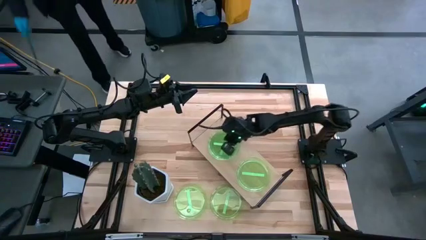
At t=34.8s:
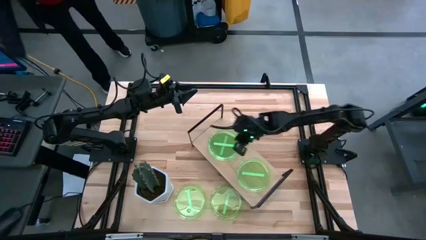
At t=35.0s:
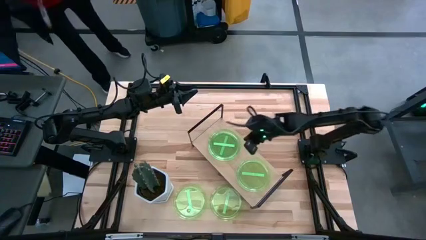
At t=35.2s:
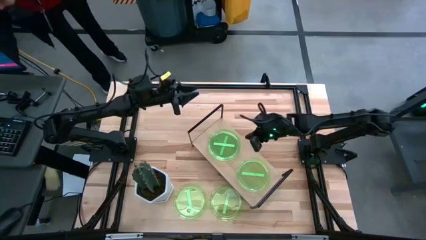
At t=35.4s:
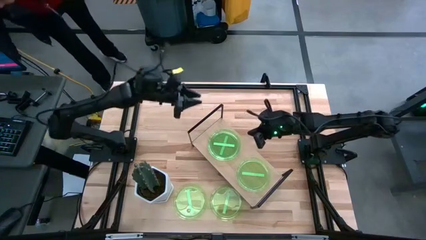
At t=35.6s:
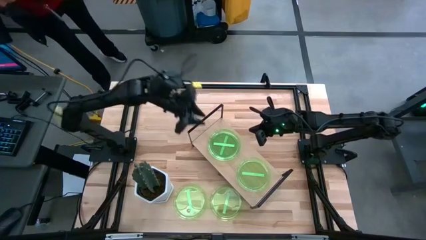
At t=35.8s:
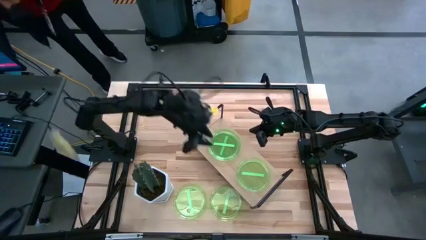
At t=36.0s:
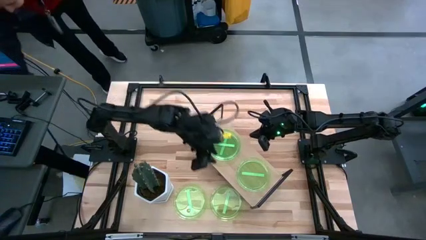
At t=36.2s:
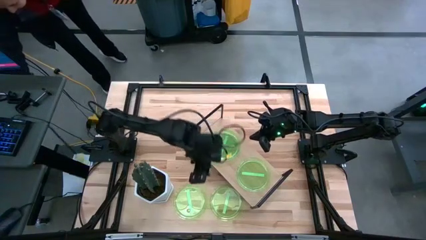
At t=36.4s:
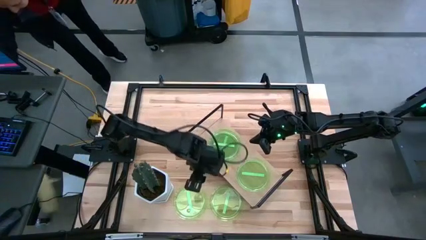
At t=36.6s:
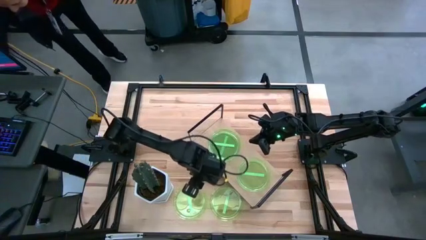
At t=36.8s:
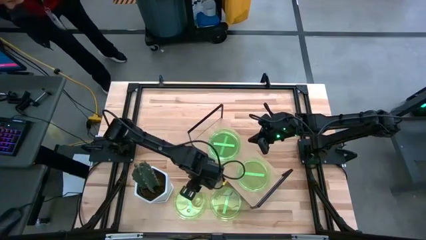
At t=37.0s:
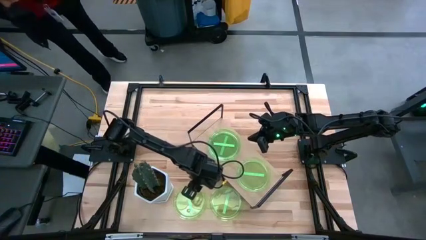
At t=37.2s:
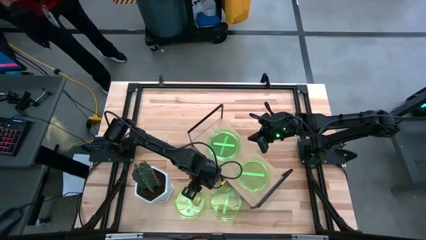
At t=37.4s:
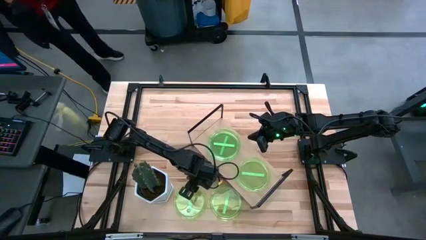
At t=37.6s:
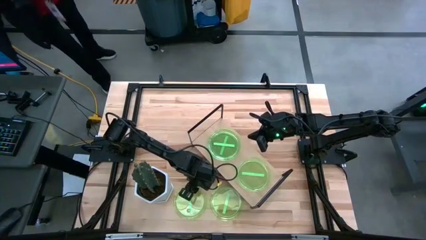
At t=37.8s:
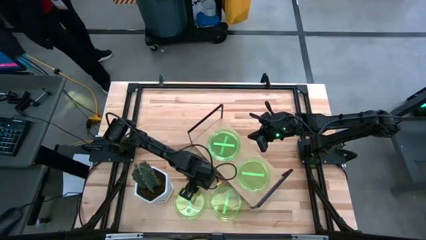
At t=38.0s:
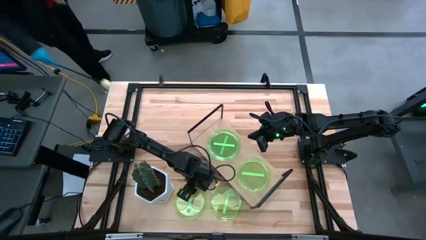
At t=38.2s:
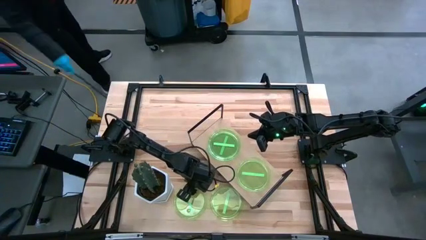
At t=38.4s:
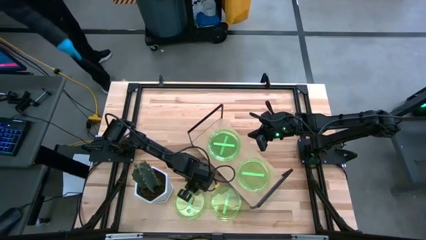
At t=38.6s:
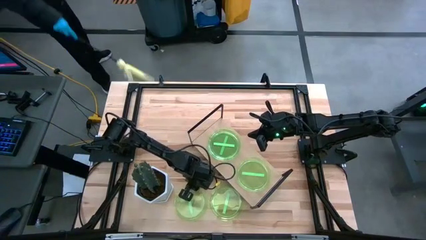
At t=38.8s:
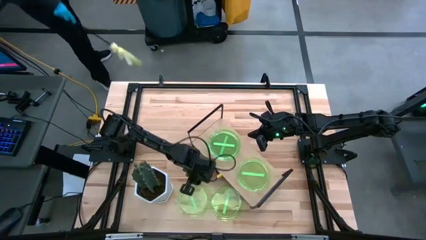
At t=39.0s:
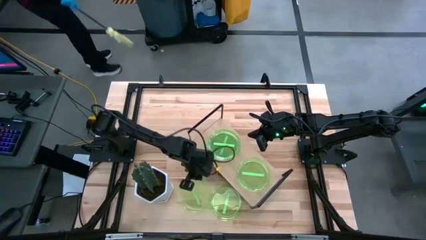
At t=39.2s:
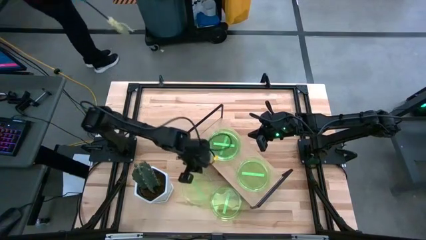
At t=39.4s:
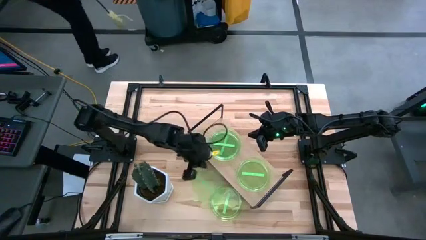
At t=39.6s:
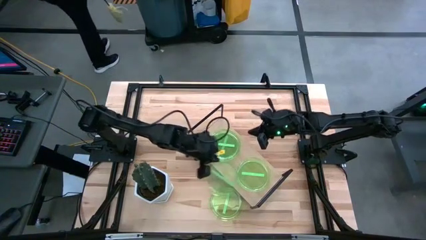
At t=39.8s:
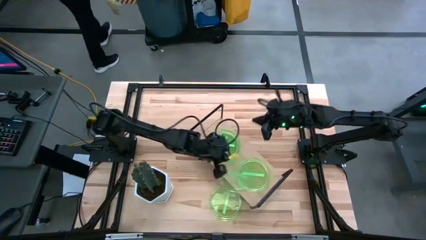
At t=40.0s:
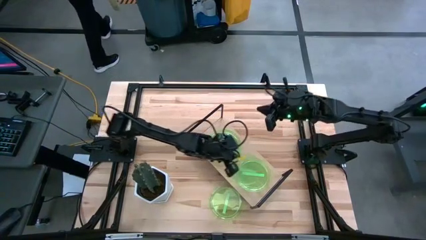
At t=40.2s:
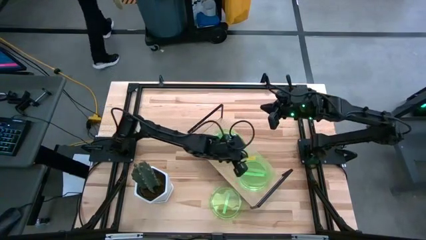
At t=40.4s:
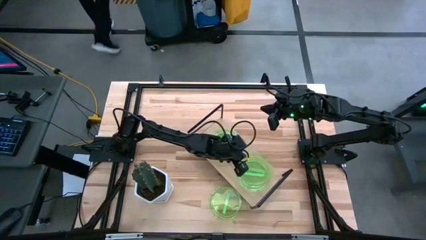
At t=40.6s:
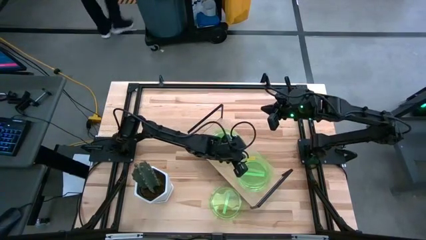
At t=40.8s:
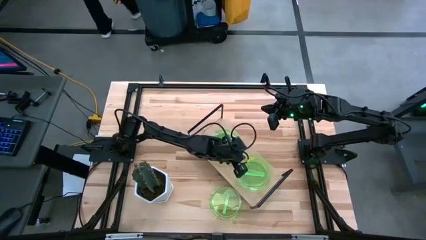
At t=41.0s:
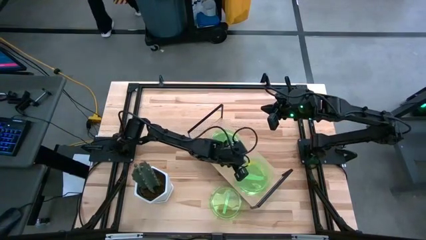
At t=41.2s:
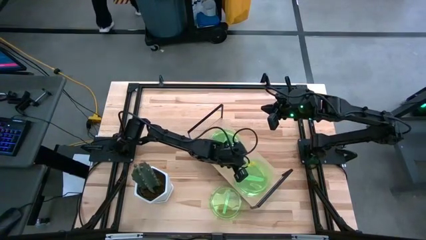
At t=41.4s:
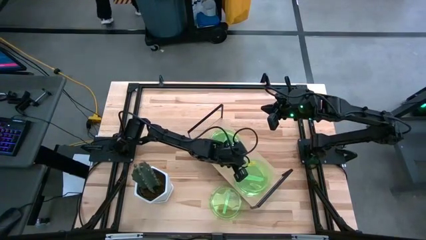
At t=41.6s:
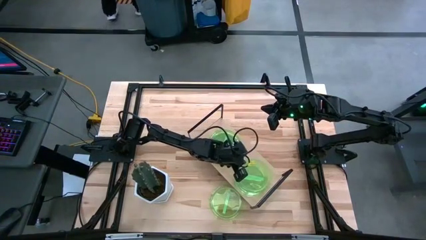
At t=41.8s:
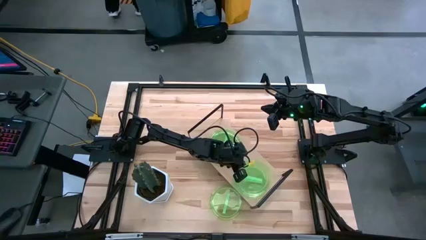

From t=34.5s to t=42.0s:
Task: Place and stack plates onto a shelf
Stack the left transparent green plate on top of the right transparent green plate on the shelf

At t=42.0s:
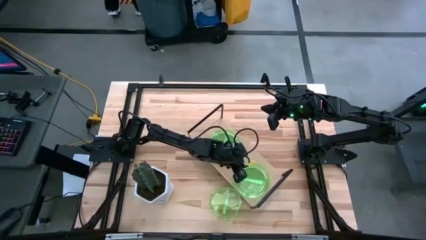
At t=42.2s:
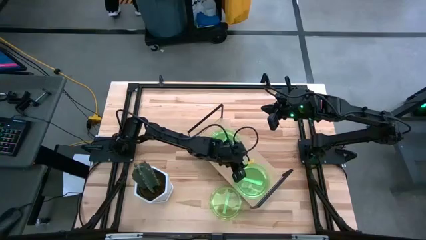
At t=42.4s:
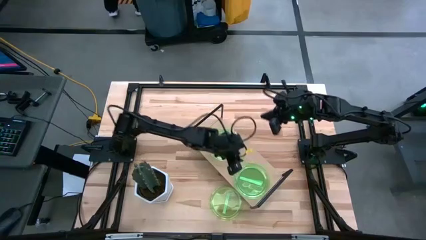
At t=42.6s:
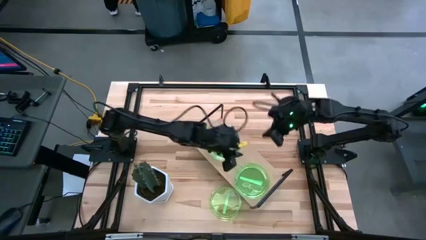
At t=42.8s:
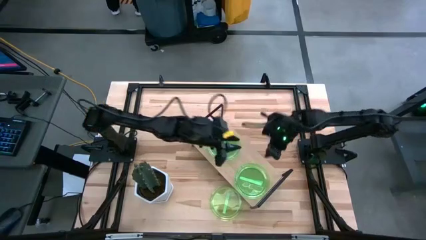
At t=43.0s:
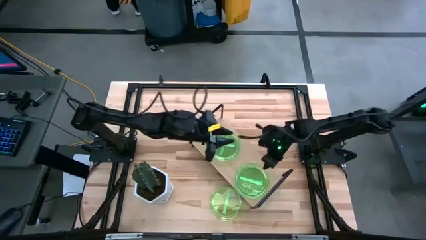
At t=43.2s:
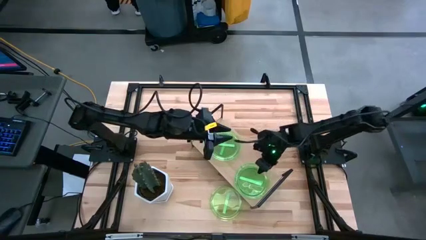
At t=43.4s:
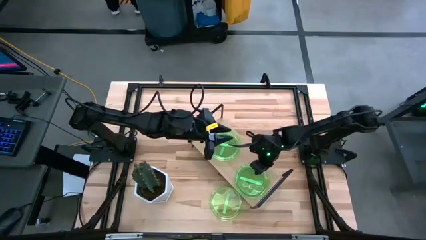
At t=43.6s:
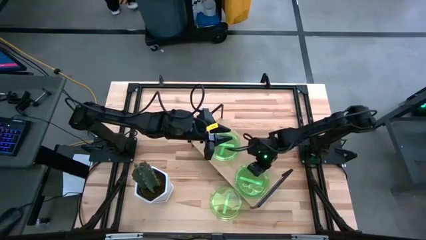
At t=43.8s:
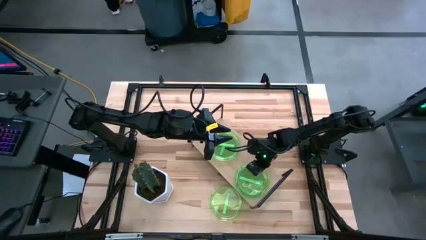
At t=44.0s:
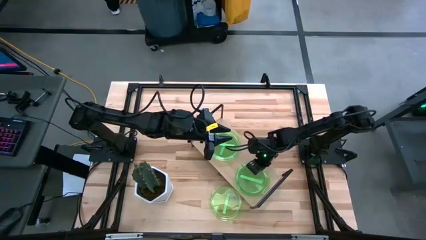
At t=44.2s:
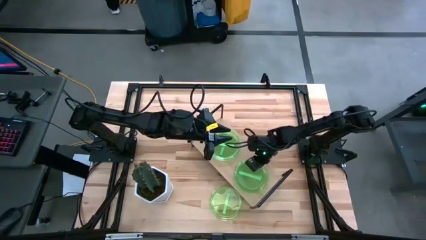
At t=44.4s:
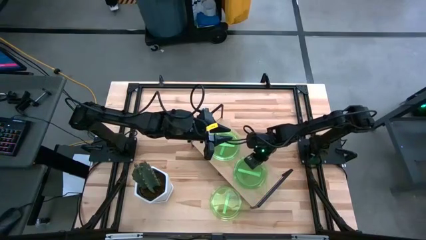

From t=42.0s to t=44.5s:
Adjust the right transparent green plate on the shelf

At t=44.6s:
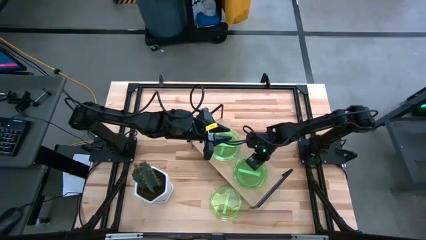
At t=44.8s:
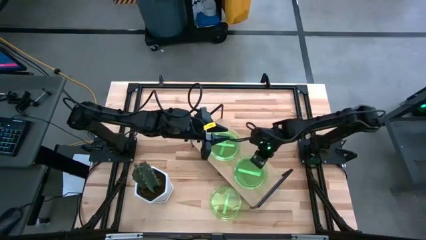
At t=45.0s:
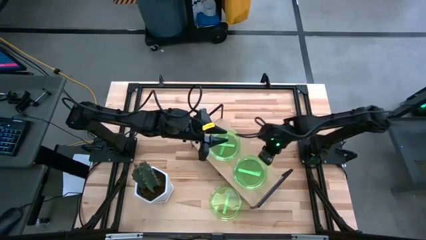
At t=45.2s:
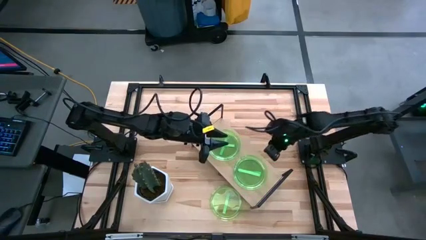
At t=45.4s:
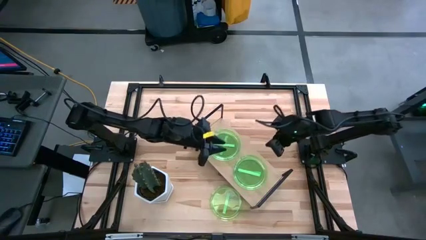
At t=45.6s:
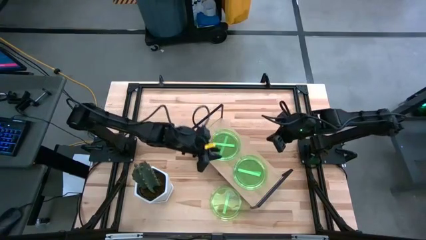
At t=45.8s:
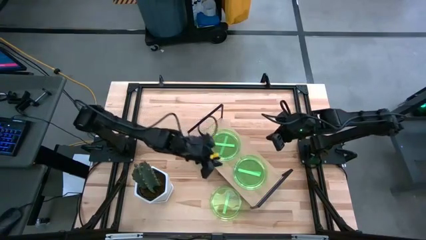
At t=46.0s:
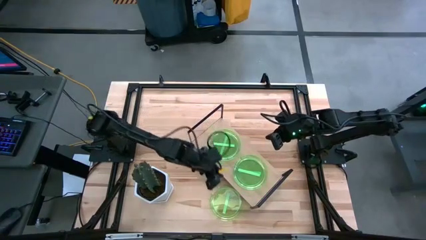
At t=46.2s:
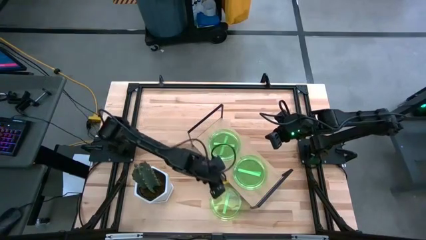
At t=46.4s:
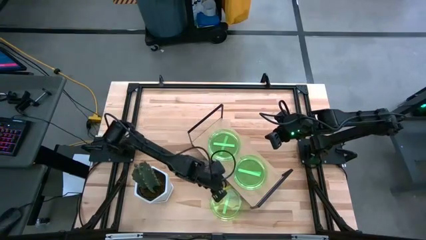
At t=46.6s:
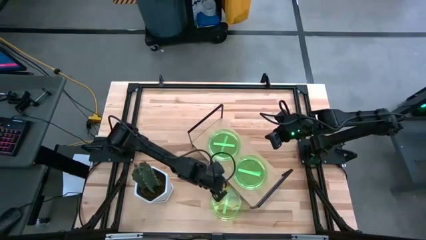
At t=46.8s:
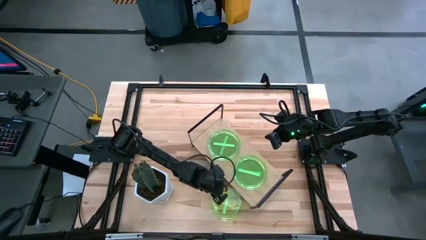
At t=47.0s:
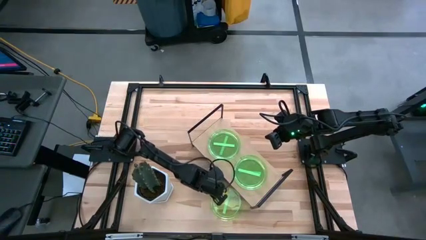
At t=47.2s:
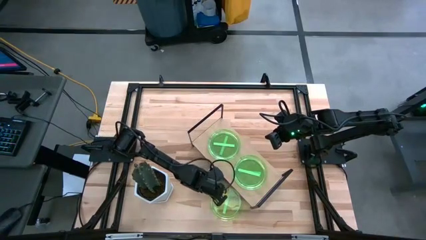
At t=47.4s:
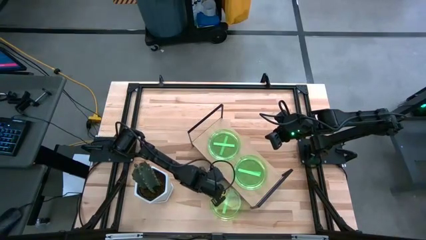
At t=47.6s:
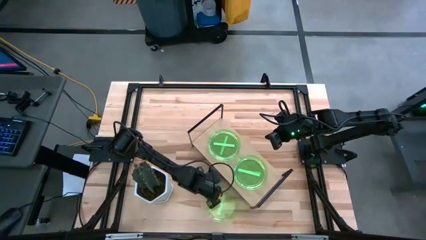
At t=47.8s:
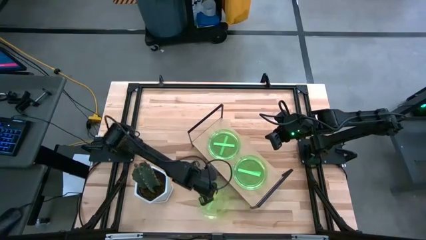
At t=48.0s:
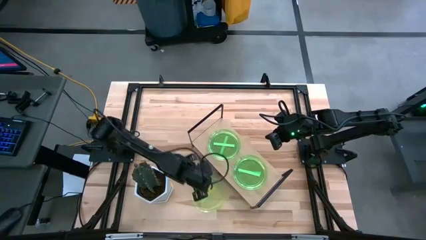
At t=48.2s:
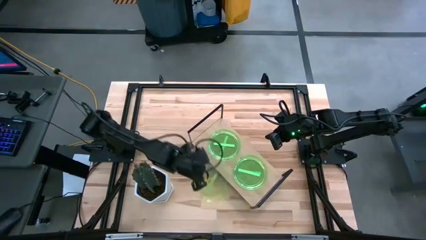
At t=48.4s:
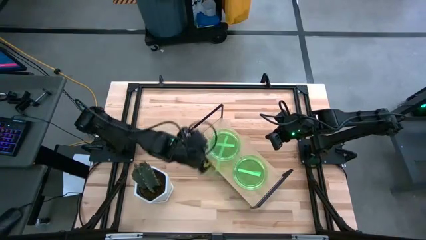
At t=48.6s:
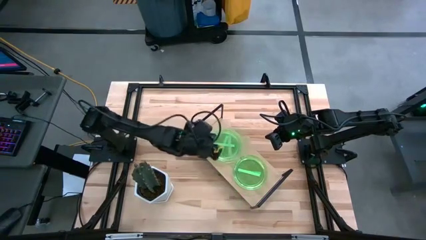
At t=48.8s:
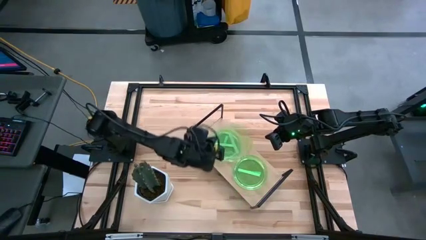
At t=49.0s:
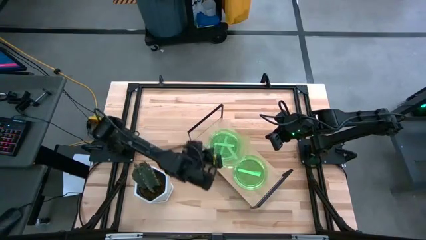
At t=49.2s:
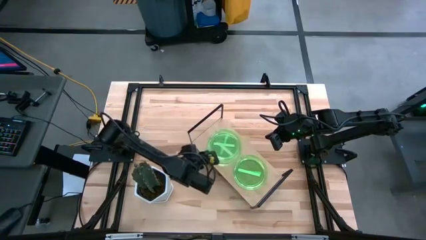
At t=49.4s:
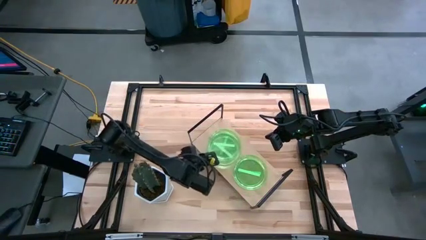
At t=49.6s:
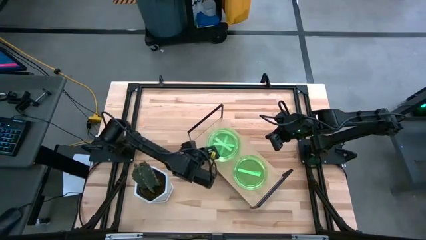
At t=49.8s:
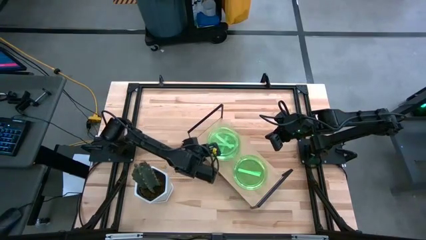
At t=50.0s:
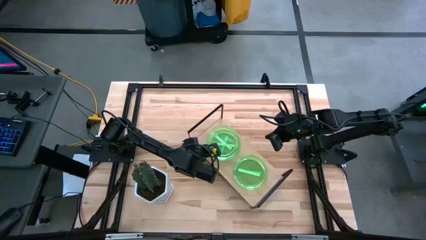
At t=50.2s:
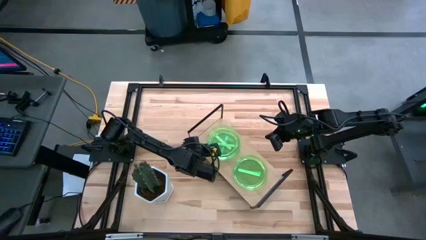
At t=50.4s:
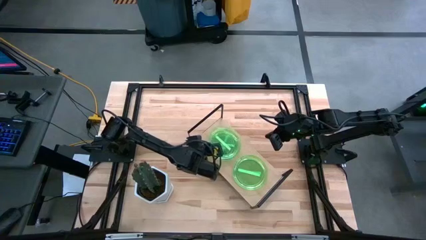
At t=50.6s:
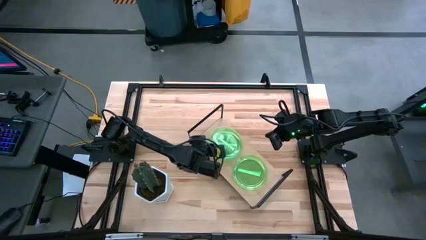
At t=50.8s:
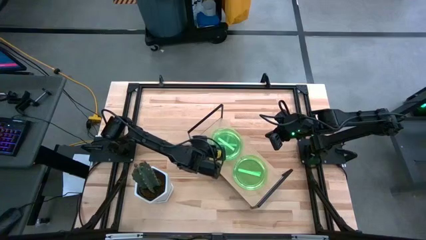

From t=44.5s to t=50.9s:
Stack the transparent green plate on top of the left transparent green plate on the shelf
